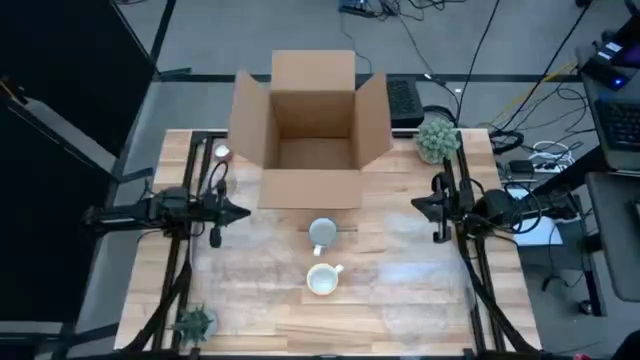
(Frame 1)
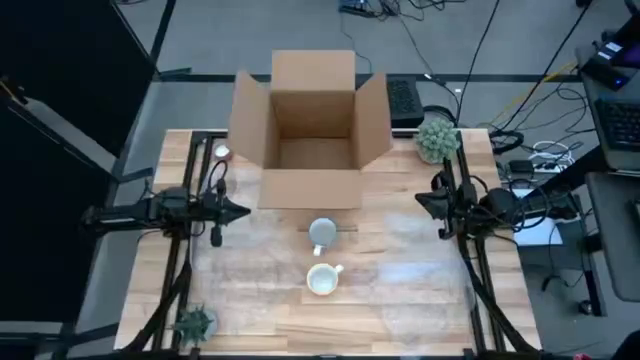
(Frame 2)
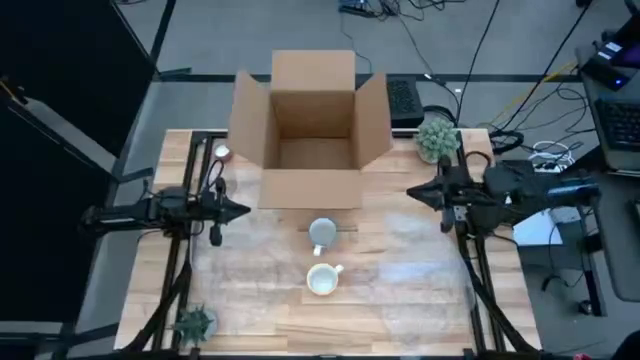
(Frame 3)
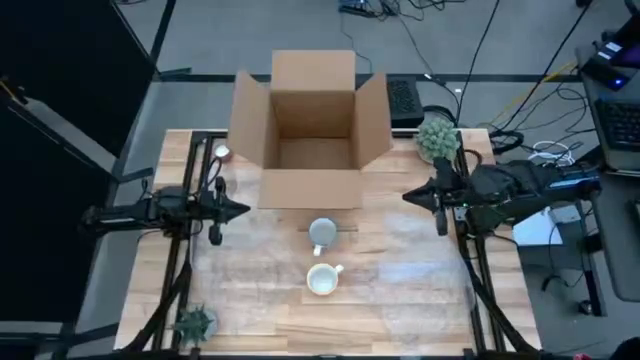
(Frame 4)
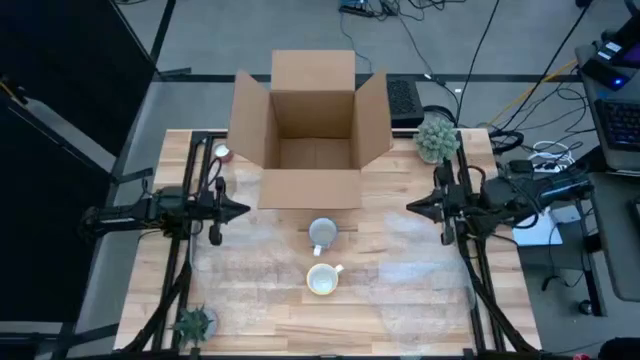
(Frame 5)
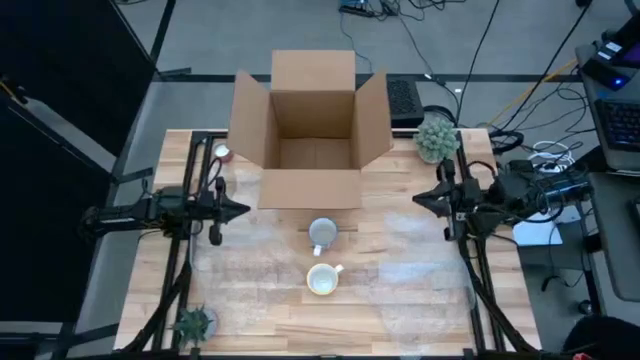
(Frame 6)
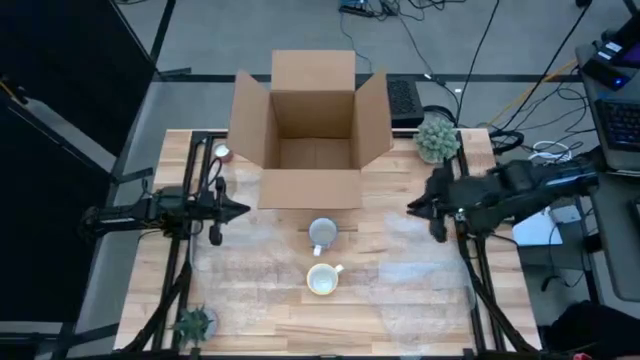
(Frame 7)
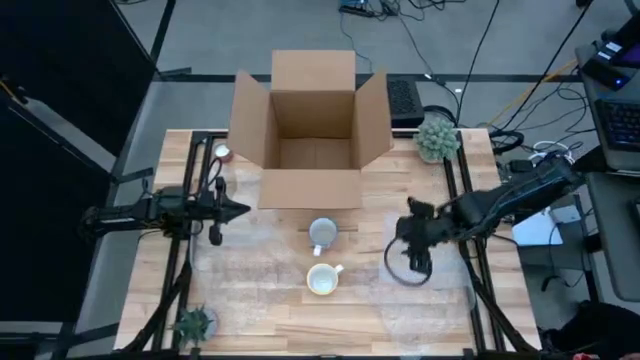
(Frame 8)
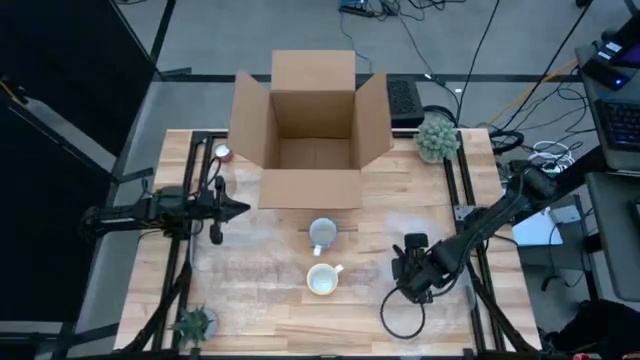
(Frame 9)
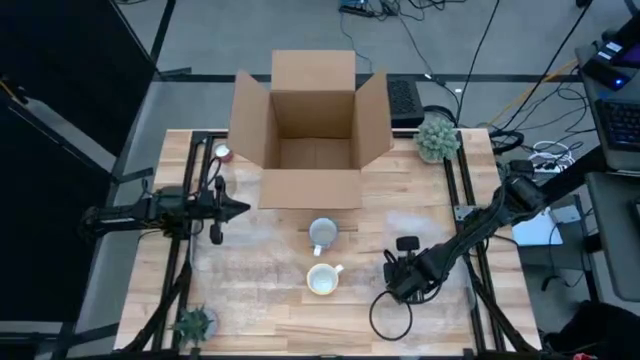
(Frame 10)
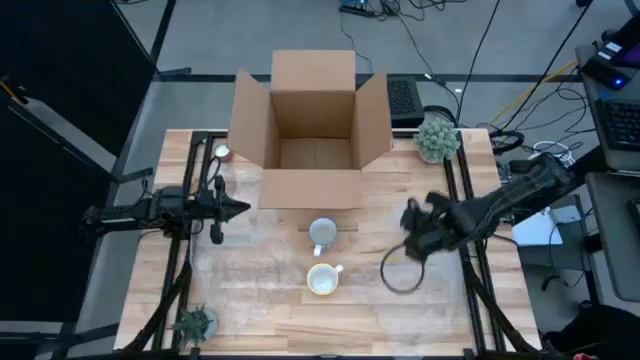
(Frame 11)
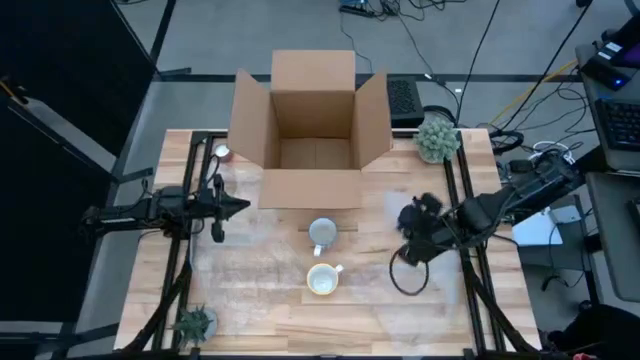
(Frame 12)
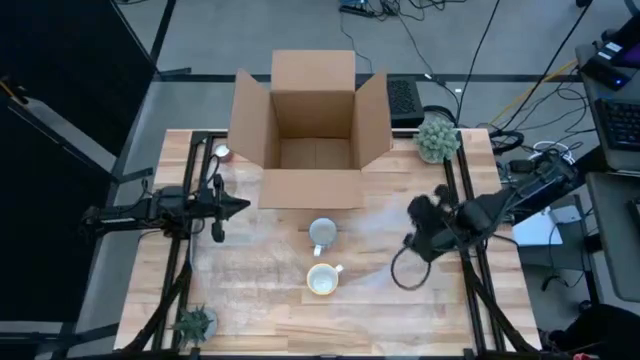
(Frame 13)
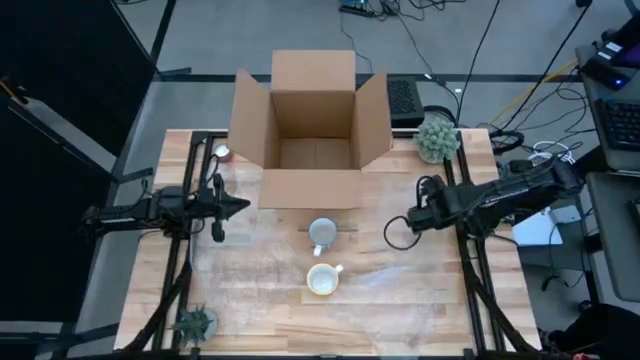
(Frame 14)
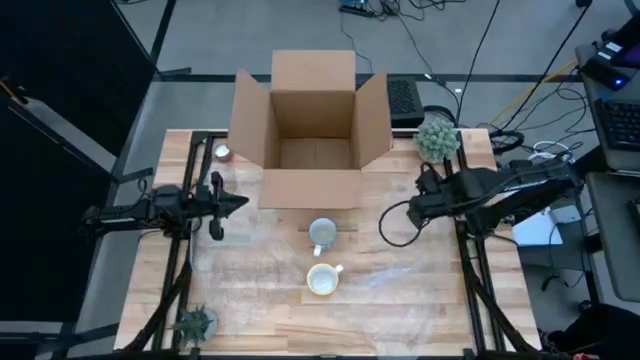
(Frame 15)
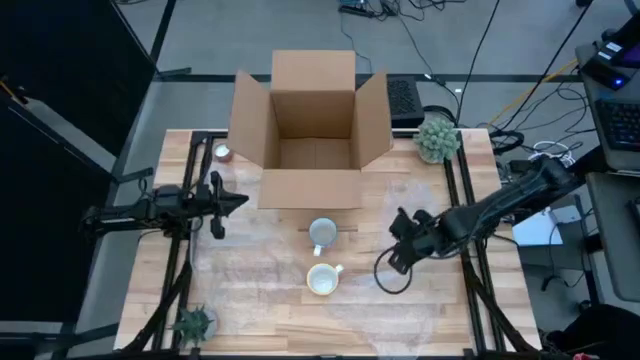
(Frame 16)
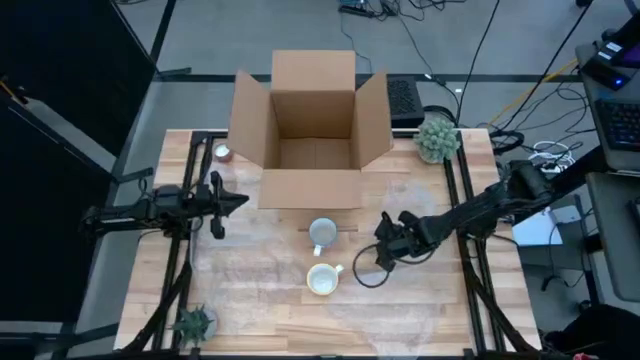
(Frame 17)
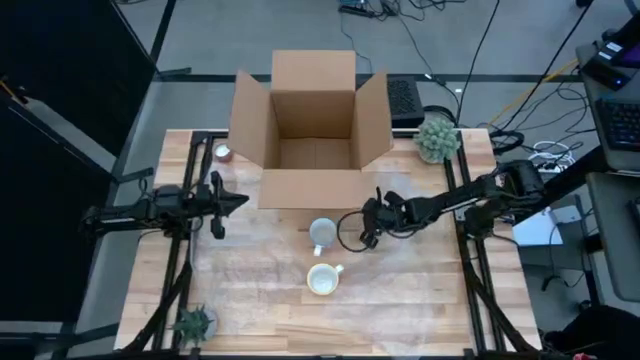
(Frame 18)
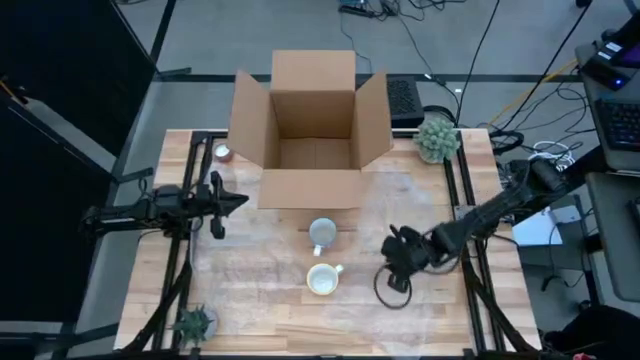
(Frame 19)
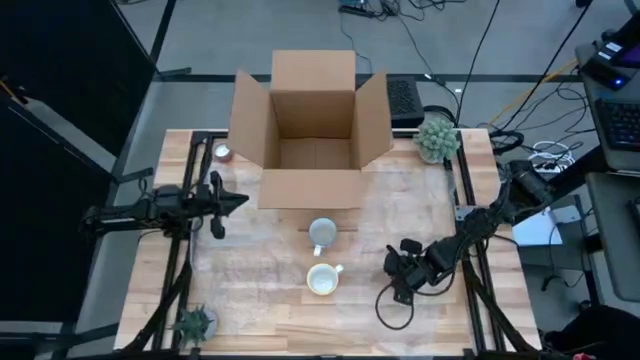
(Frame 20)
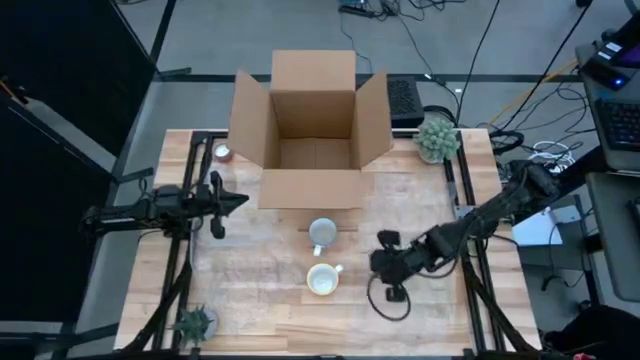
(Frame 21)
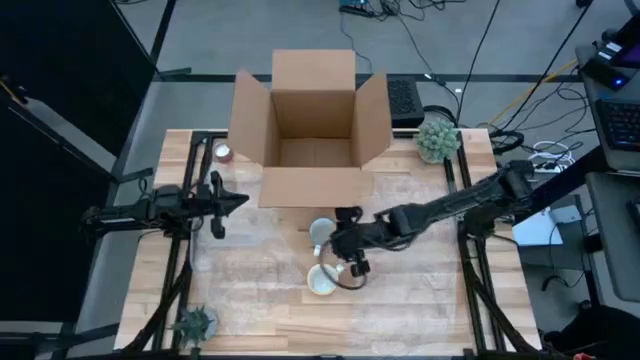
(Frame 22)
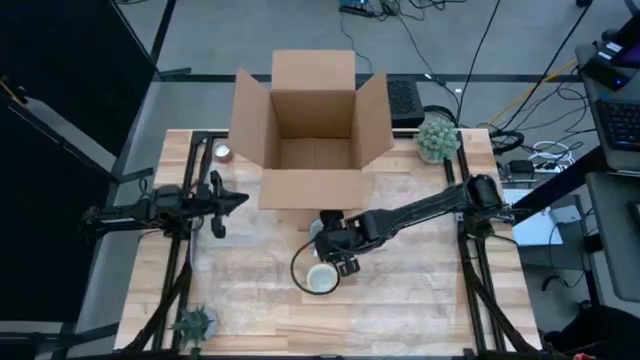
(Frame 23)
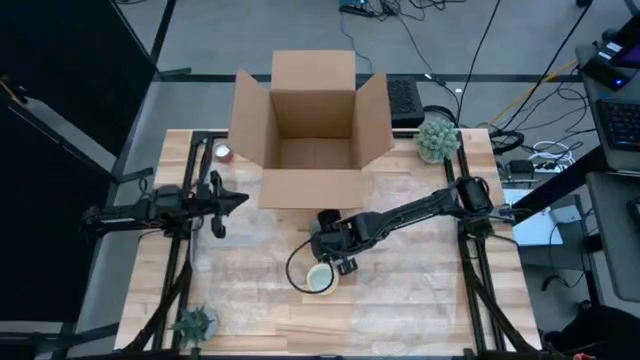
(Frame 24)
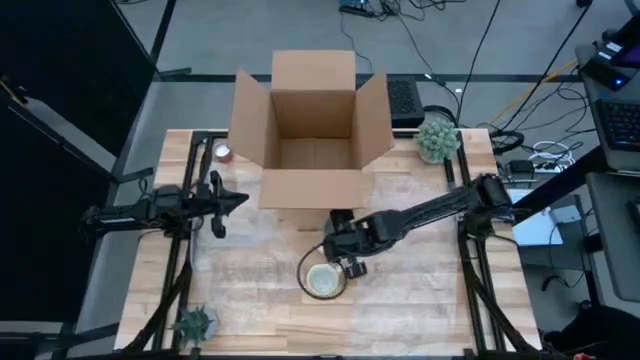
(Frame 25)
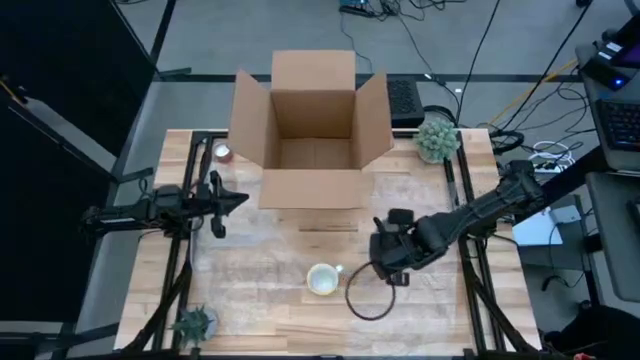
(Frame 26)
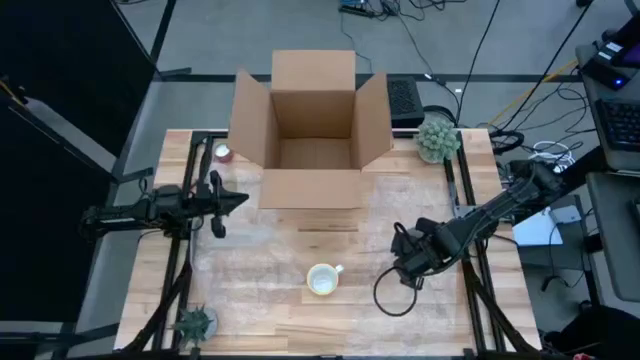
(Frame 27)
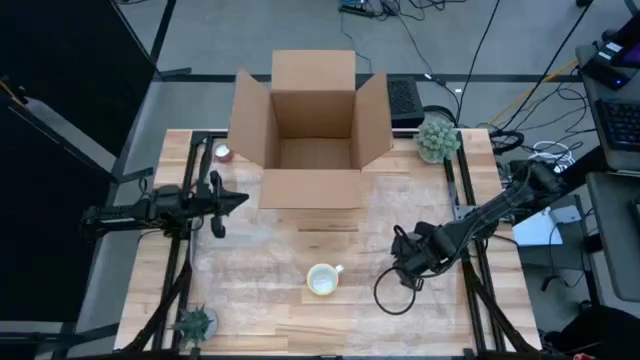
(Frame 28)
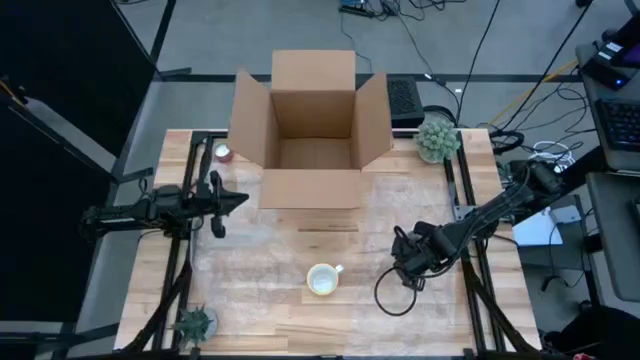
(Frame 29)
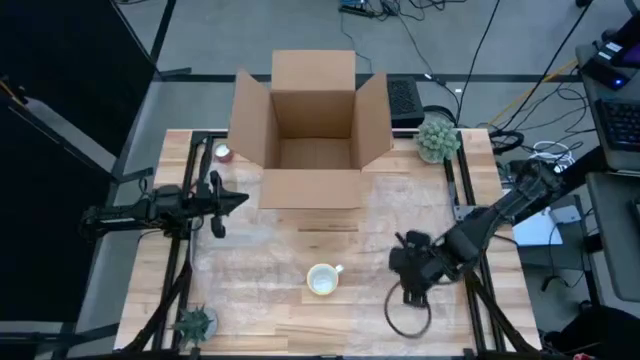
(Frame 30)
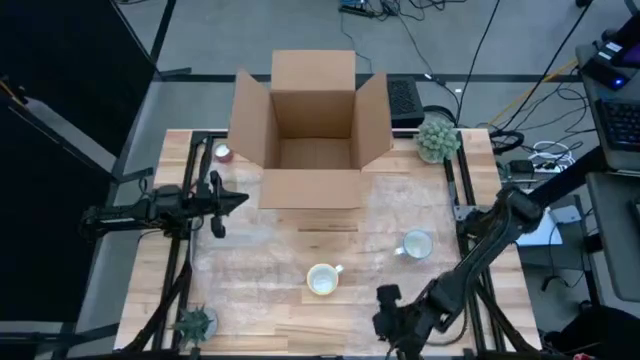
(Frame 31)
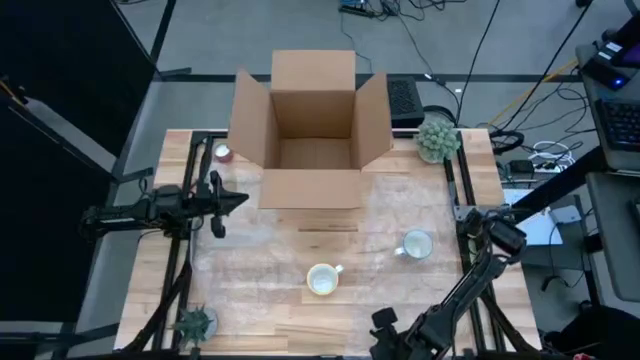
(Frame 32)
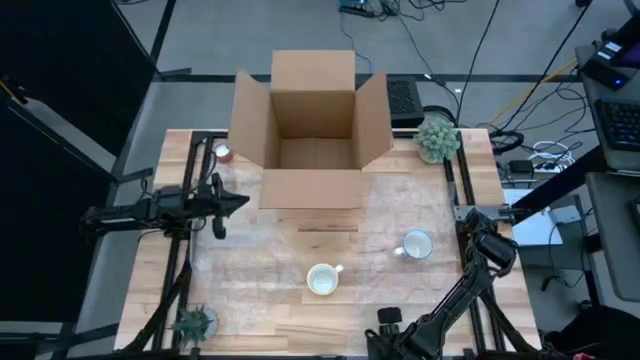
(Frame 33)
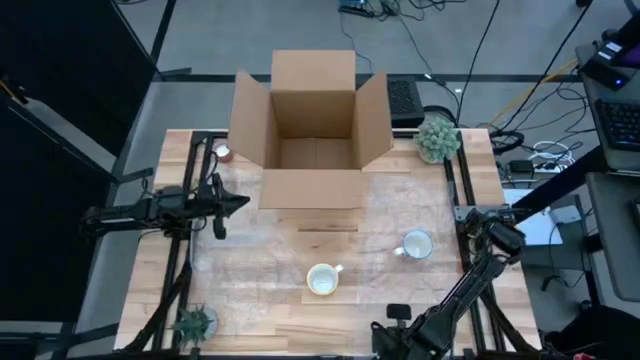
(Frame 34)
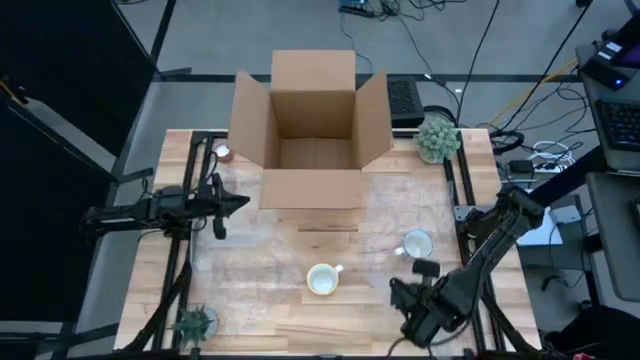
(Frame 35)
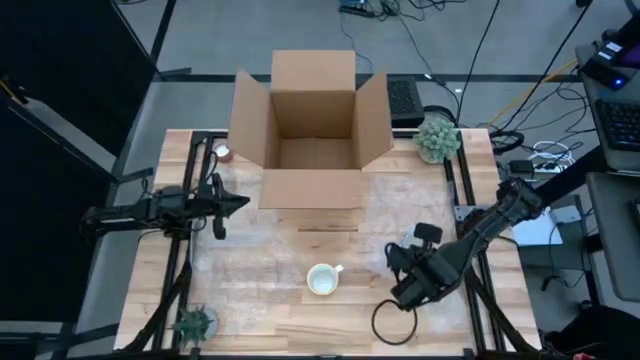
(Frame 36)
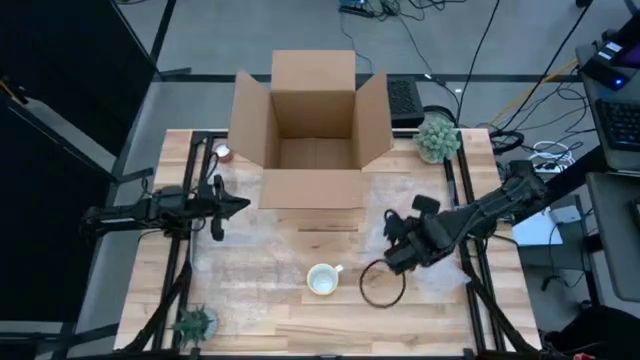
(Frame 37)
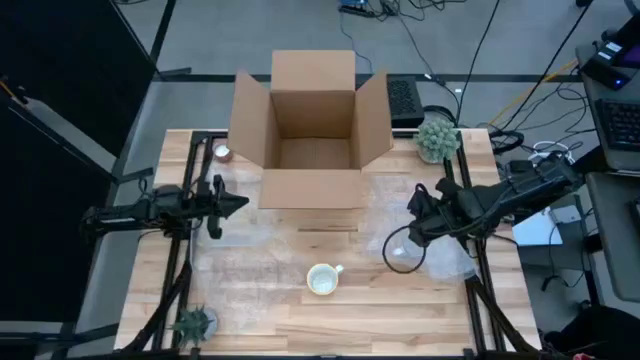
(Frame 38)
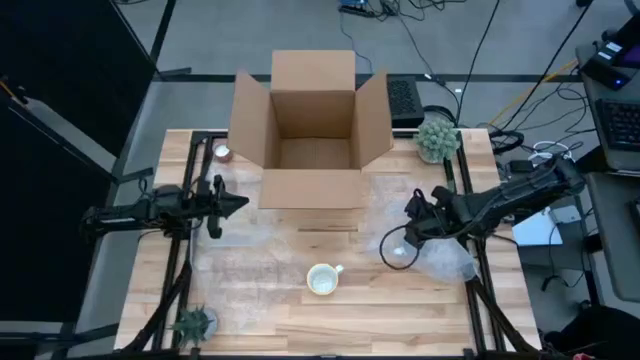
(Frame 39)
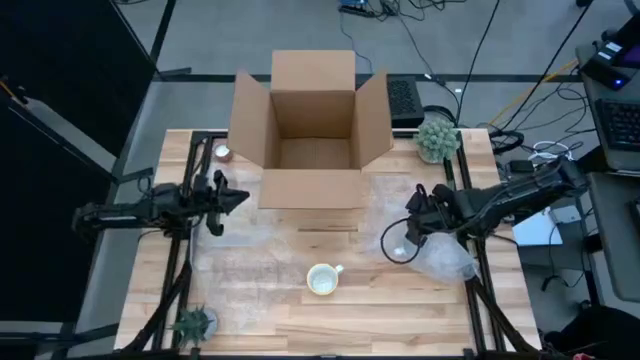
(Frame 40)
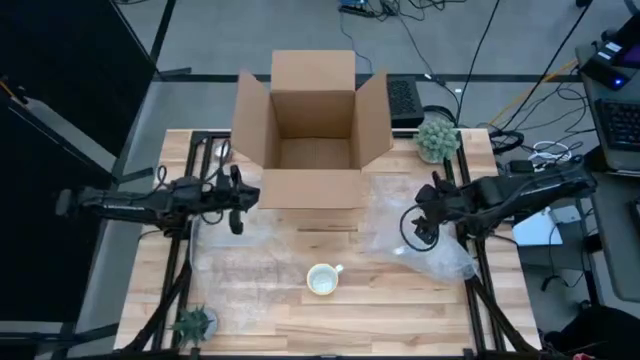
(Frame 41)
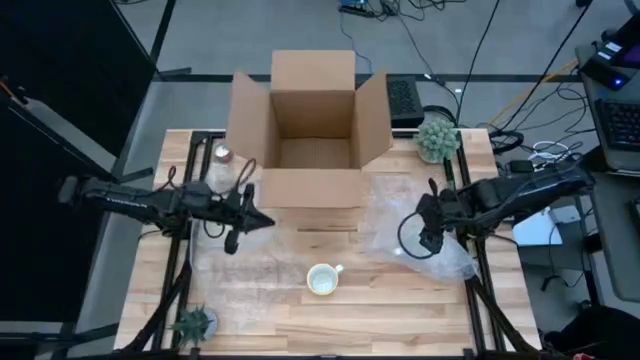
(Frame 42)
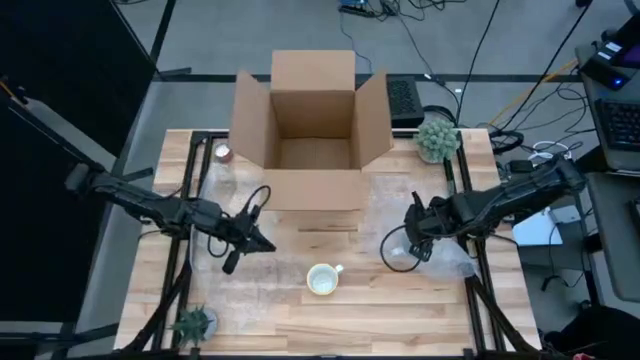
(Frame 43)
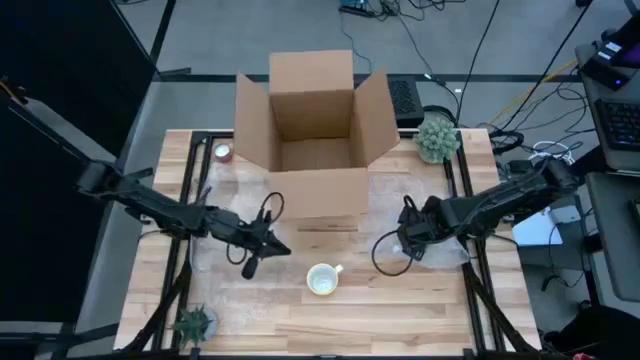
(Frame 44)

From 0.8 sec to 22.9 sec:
Task: wrap mug
Wrap the red mug with the bubble wrap
